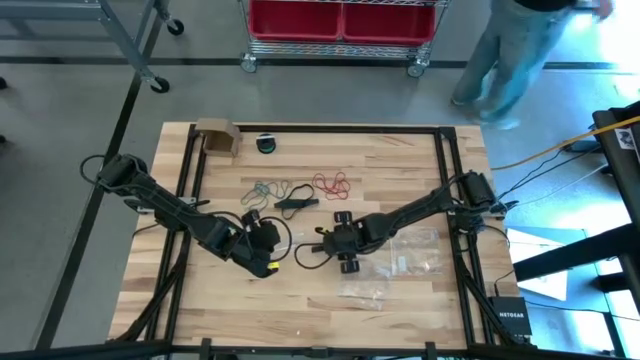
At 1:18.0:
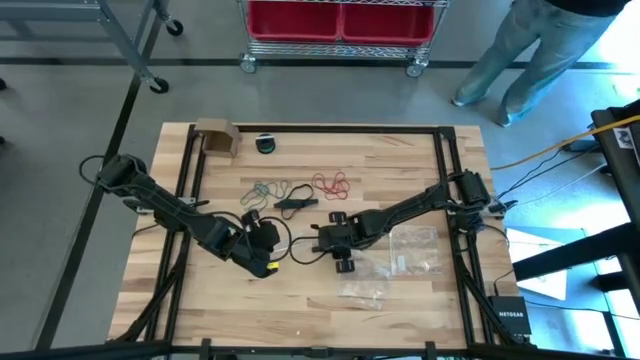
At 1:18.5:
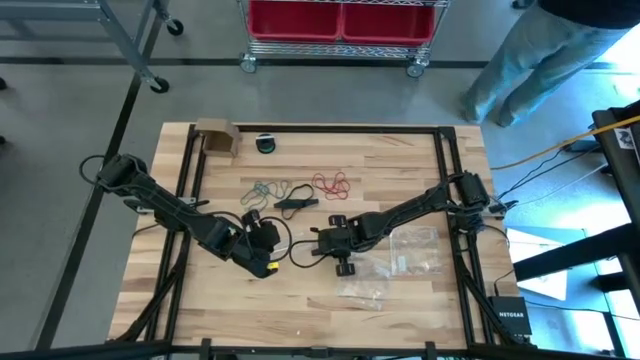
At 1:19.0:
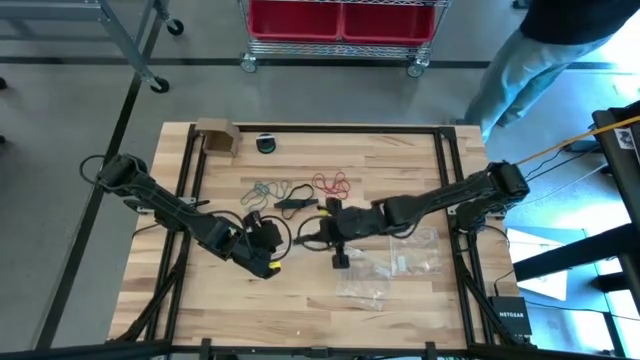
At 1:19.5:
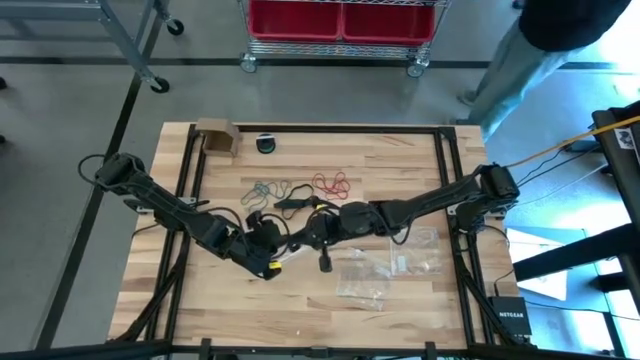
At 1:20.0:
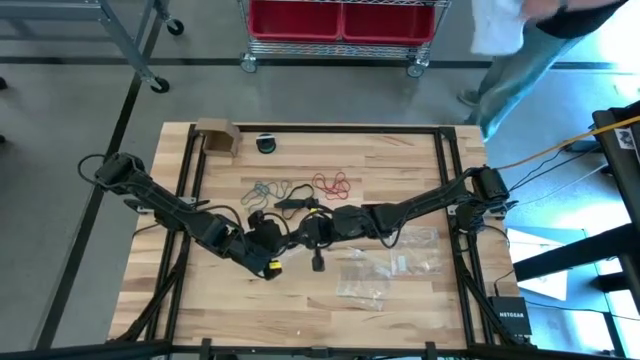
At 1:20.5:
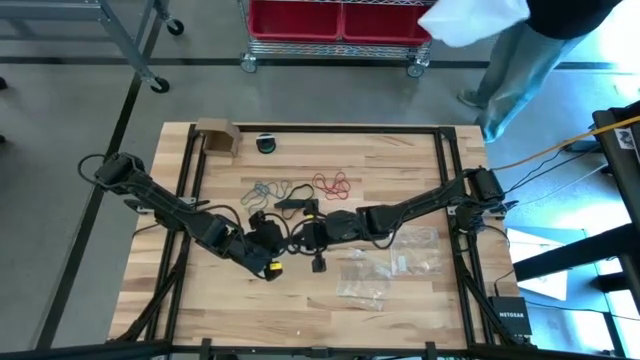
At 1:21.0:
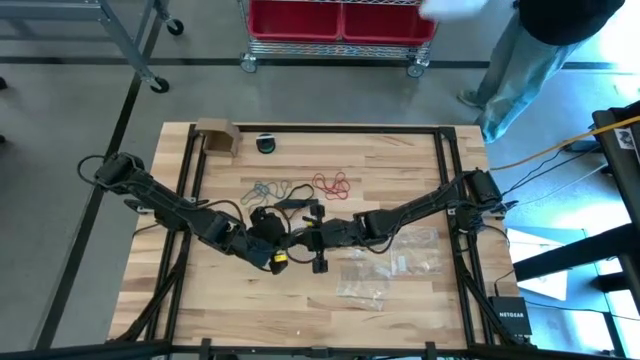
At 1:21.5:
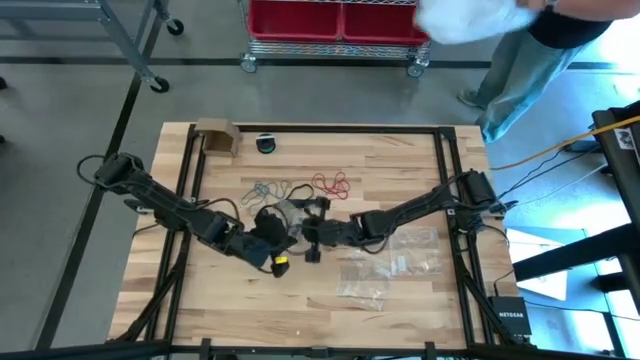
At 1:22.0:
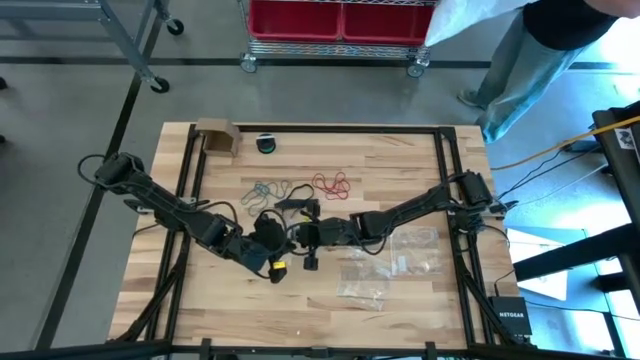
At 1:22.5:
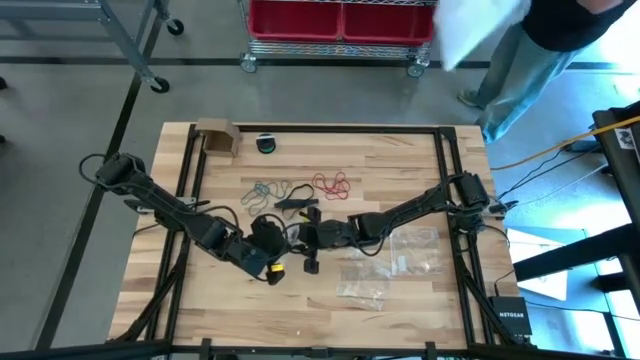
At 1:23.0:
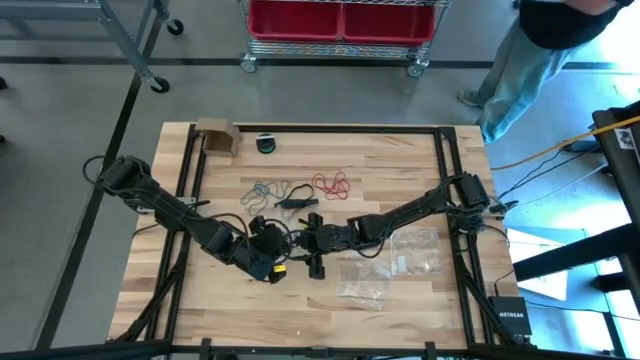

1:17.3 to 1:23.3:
Task: Sort rubber bands
Put the black rubber band into the transparent zip bag

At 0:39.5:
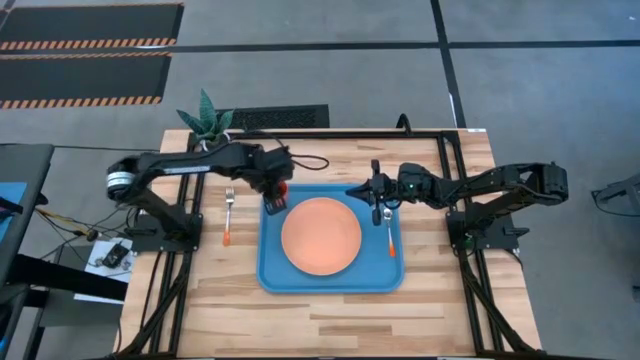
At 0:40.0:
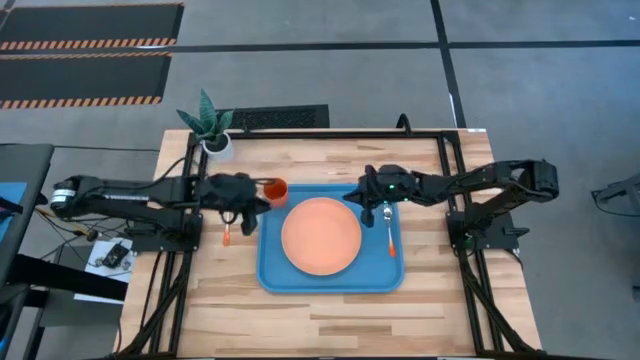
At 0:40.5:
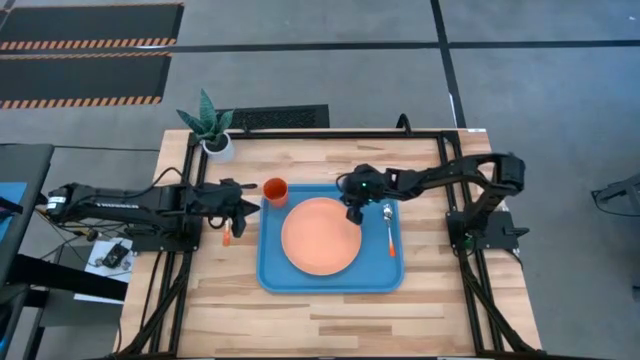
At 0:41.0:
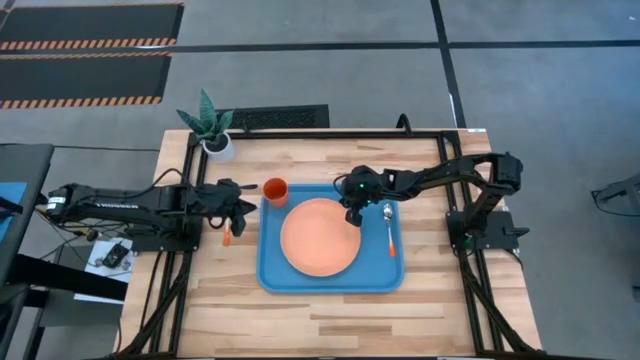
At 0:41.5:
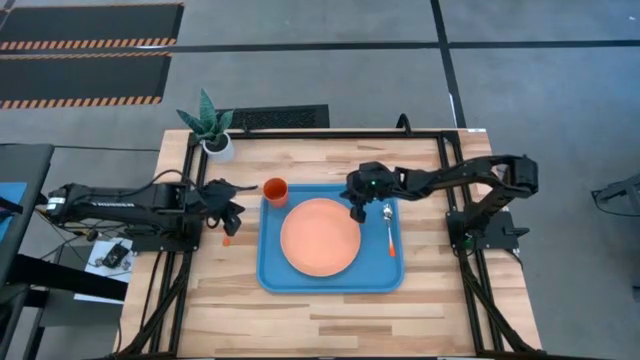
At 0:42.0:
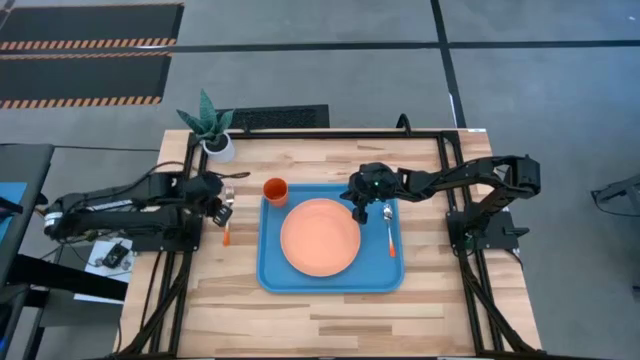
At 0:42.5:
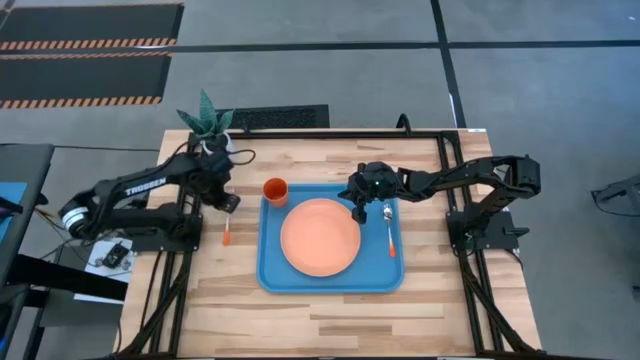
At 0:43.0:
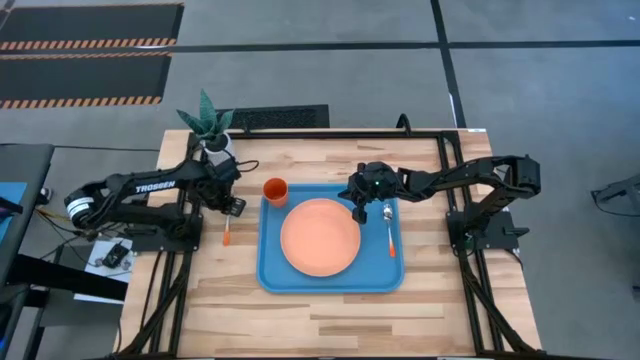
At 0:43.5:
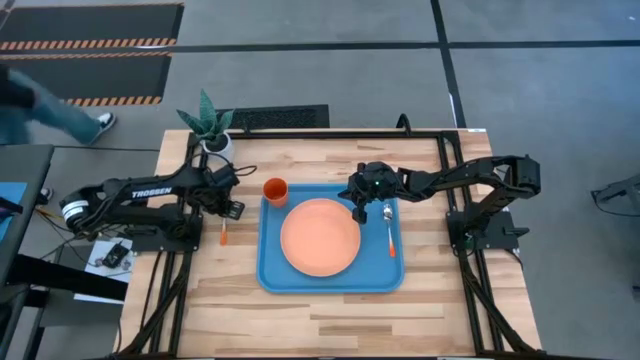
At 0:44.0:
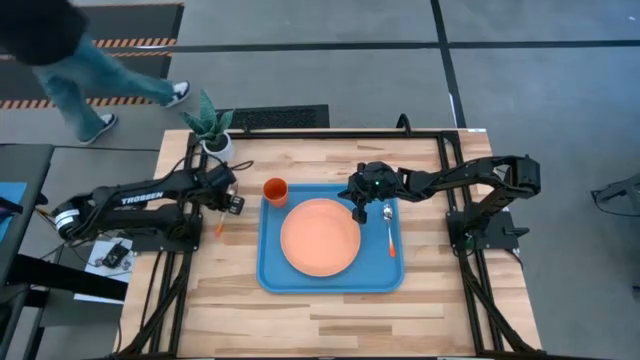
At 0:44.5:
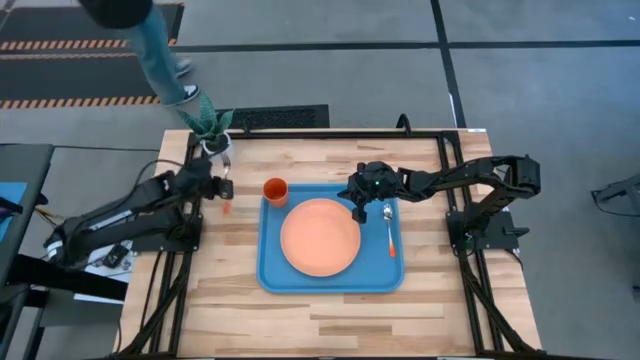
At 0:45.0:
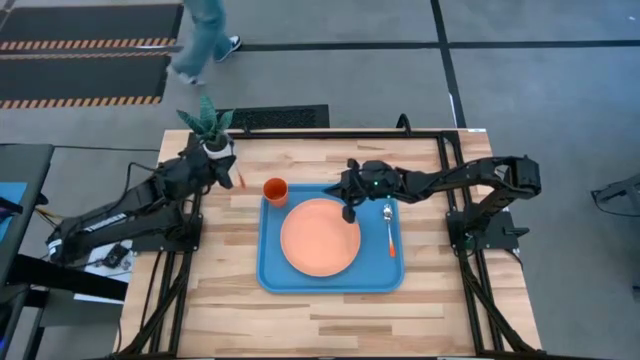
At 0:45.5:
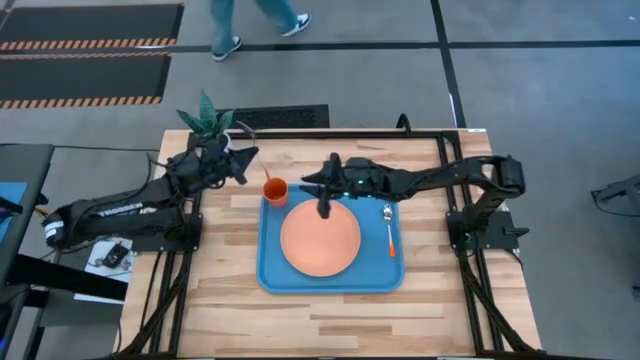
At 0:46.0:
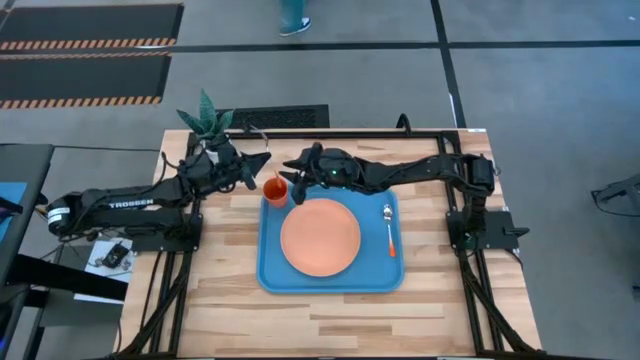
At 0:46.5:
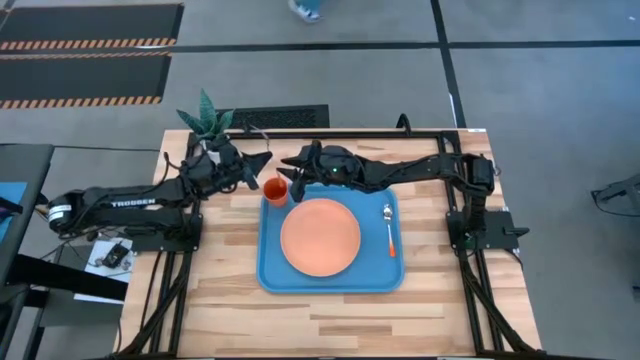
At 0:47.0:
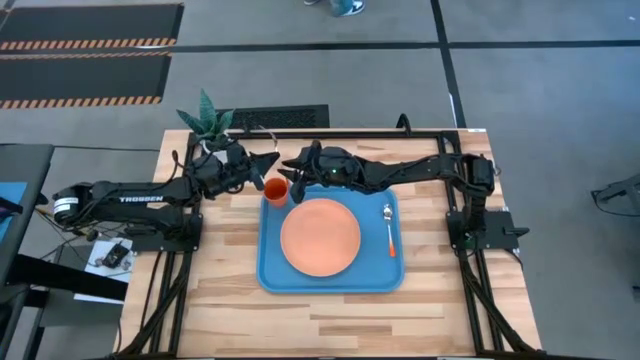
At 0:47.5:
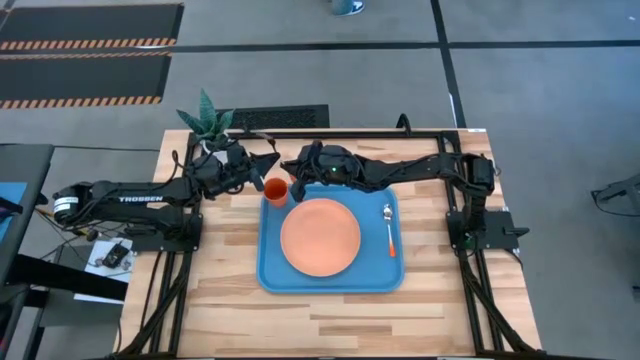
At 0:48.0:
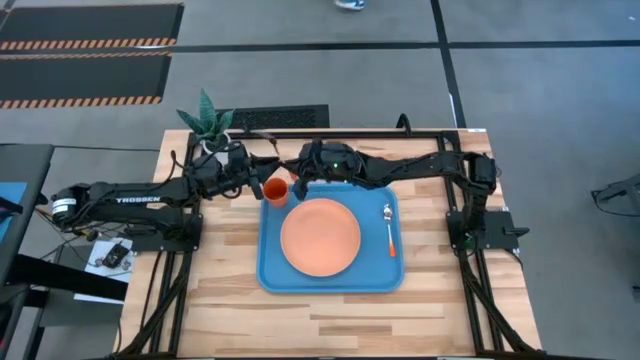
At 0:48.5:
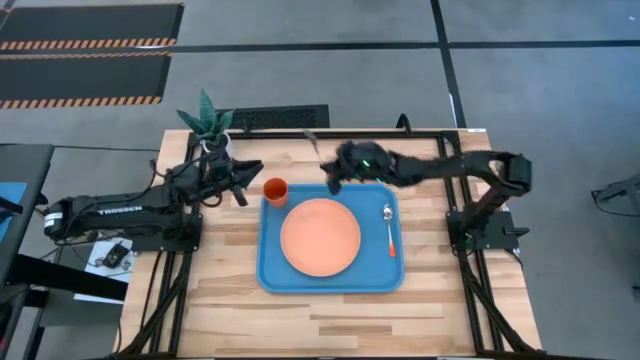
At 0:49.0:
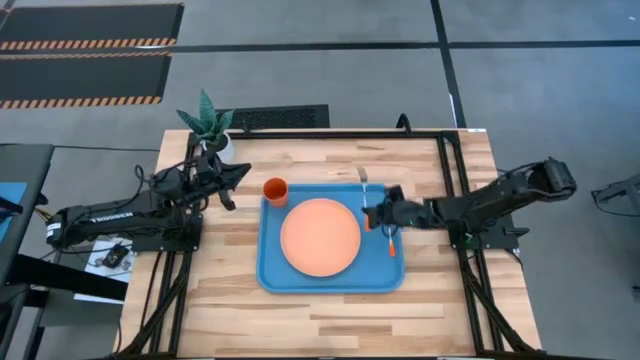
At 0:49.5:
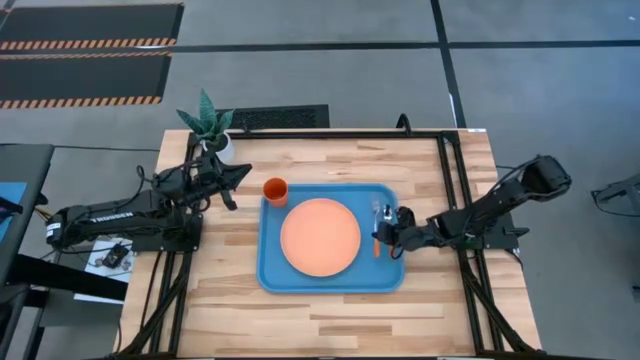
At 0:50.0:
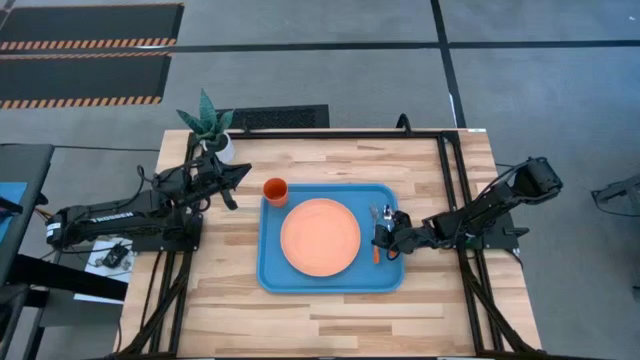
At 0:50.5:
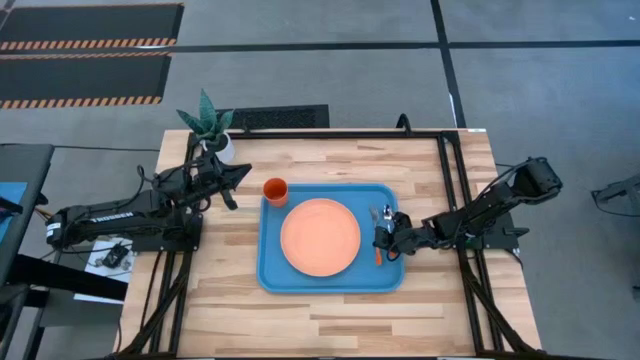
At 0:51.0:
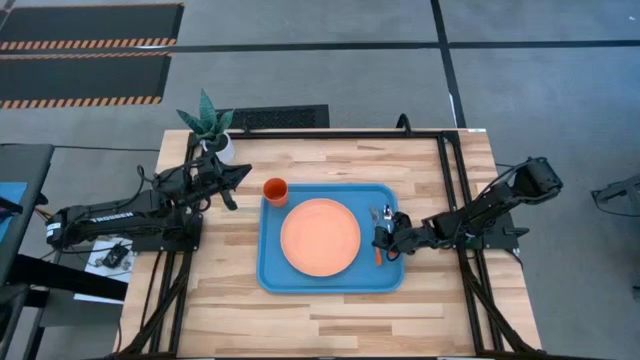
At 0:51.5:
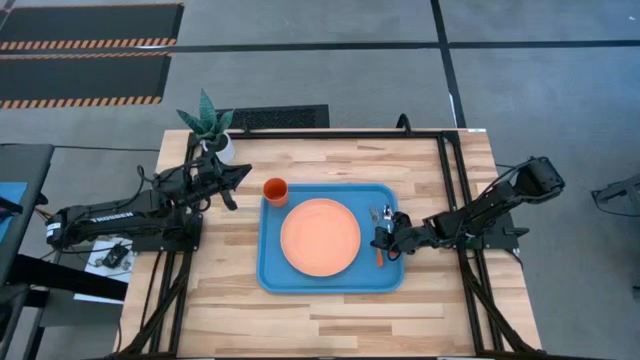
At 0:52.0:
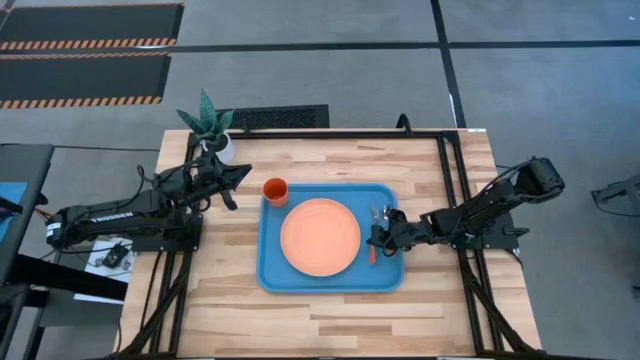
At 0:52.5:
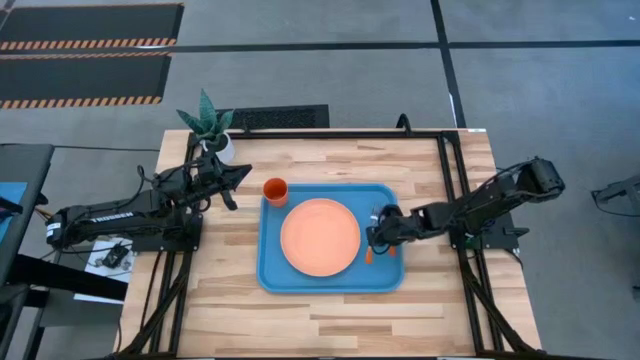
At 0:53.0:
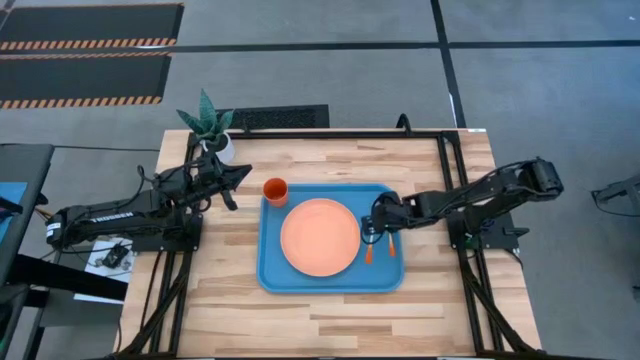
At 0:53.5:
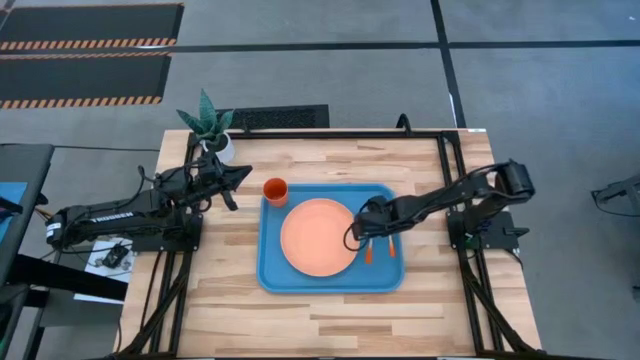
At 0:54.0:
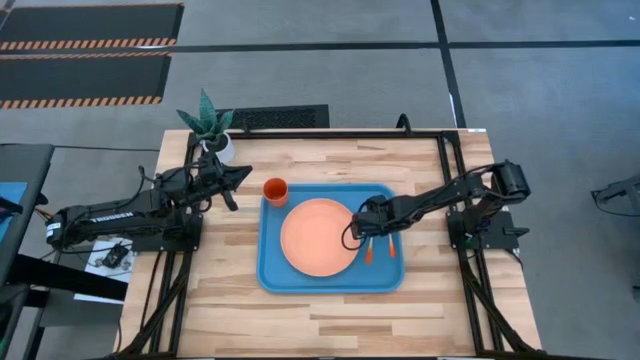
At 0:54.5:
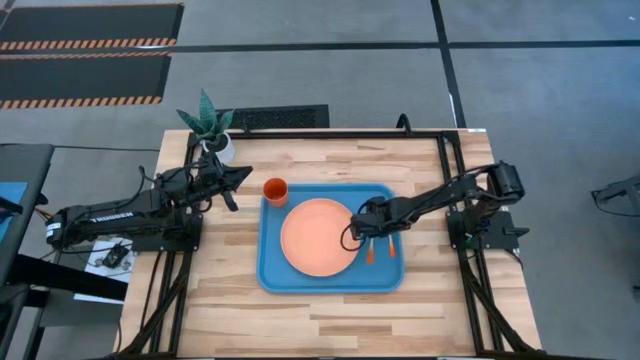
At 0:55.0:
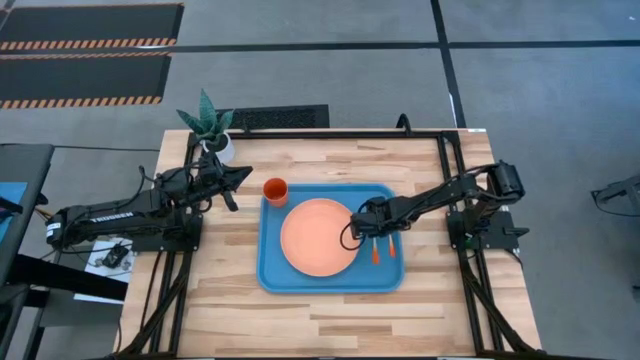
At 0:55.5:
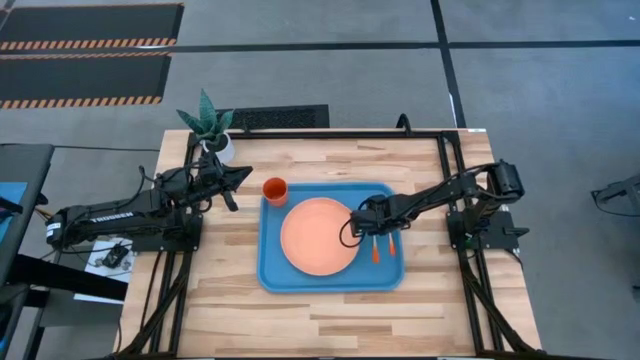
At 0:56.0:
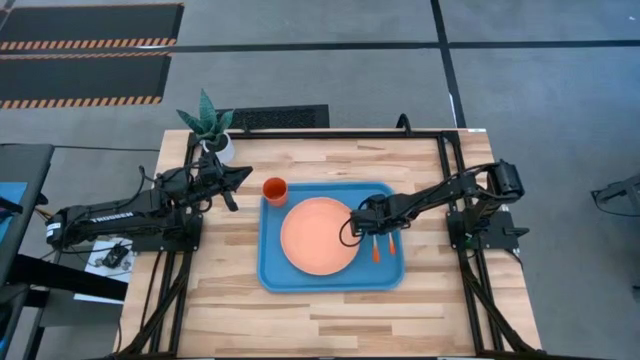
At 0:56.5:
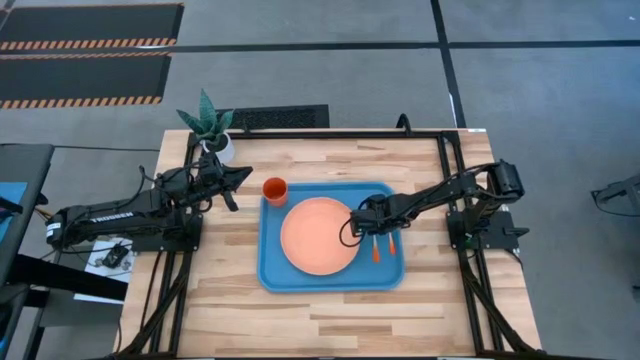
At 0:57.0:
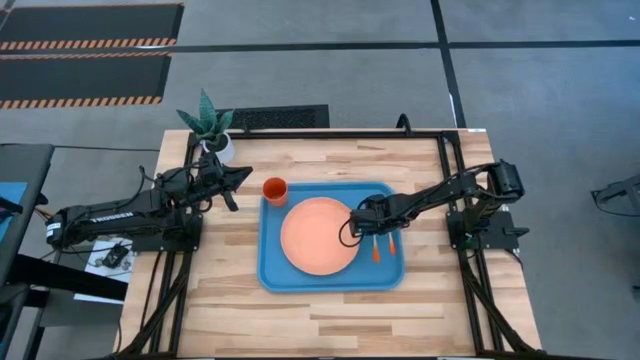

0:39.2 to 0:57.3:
Task: Pick and place plate/cup/fork/spoon on tray
Put the orange fork on the blue tray to the right of the orange plate
